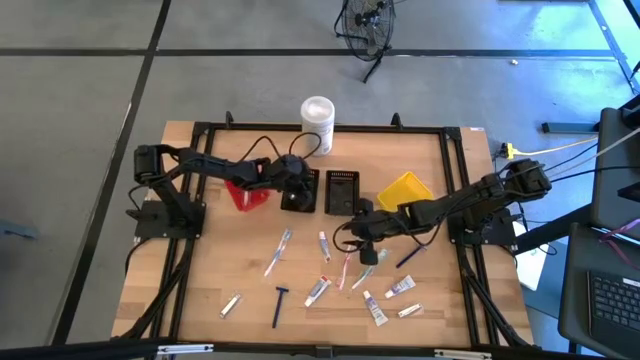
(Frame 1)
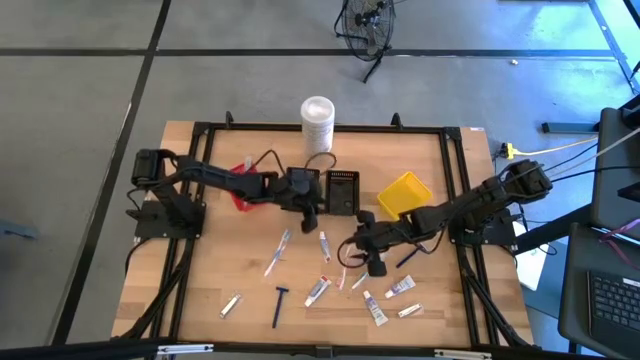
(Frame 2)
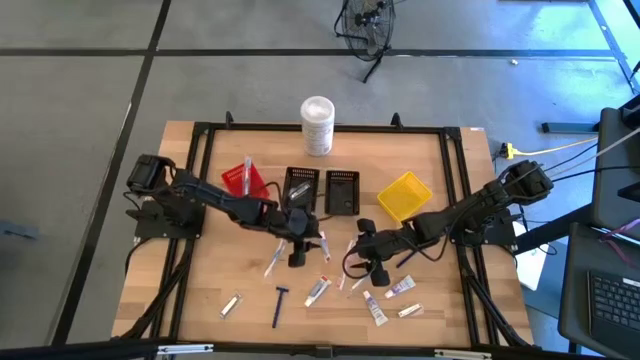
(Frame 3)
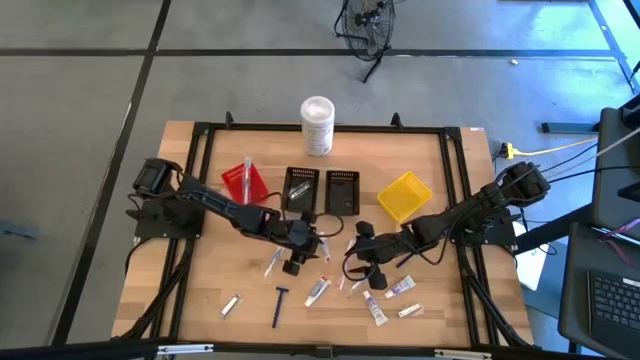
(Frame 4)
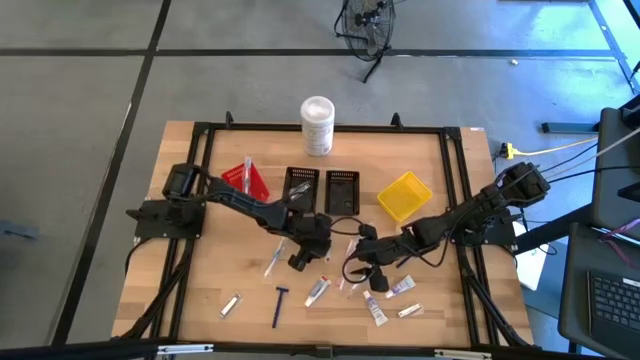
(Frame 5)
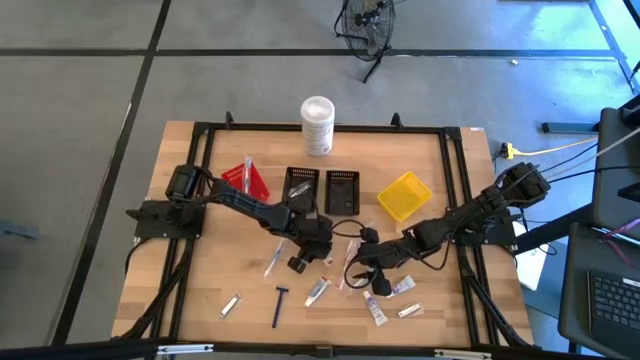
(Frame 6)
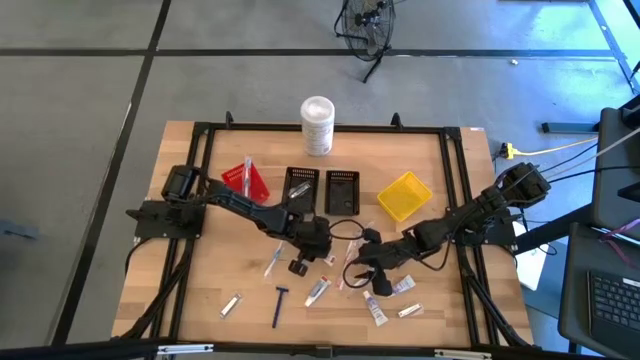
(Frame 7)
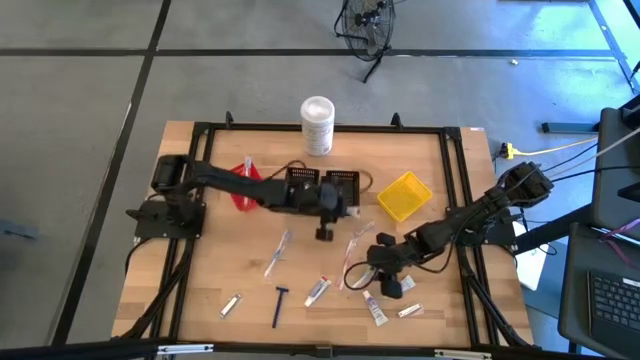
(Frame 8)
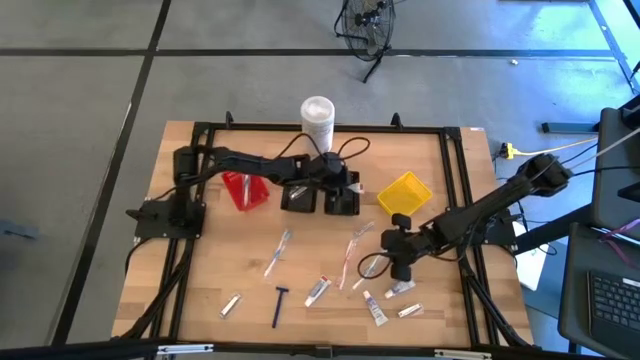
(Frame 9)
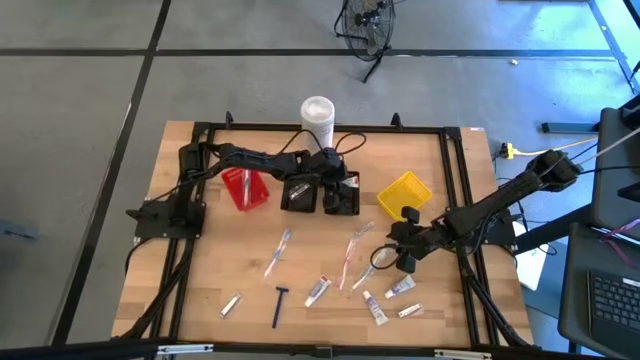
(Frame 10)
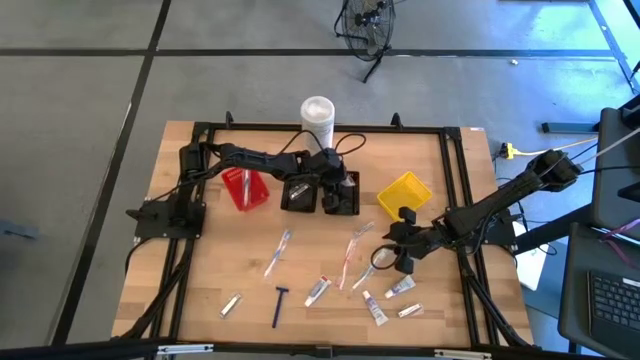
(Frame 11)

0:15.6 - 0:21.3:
Task: Pick & Place Travel size toiletries
Put the white toothpaste into the right black bin

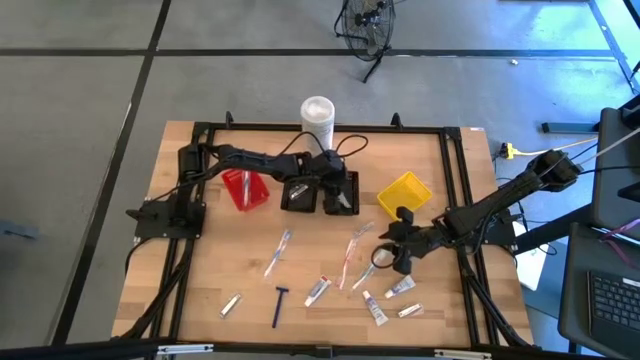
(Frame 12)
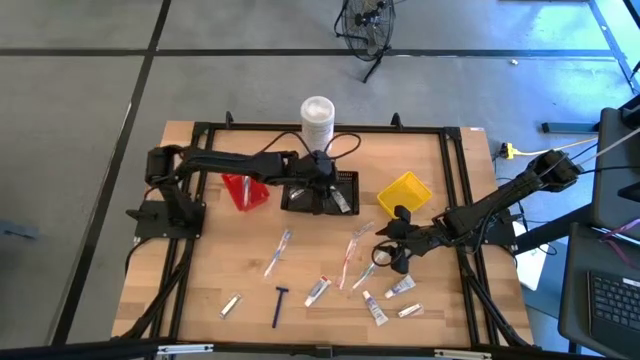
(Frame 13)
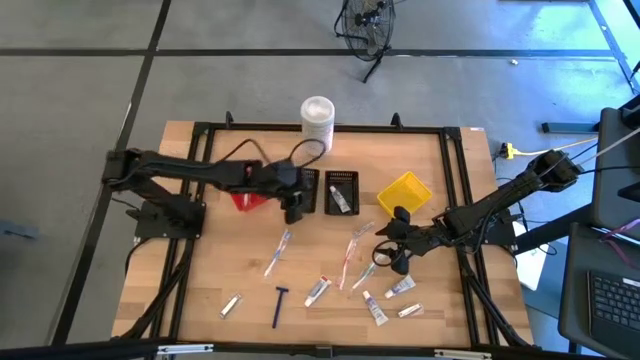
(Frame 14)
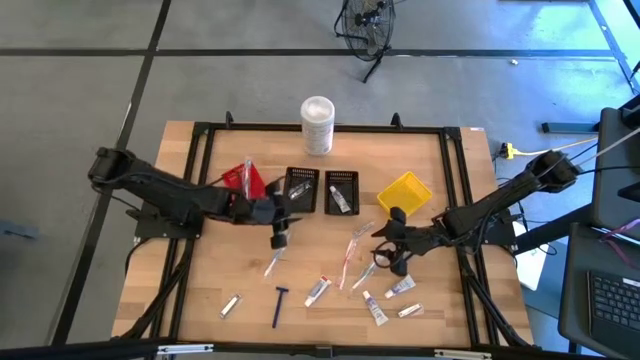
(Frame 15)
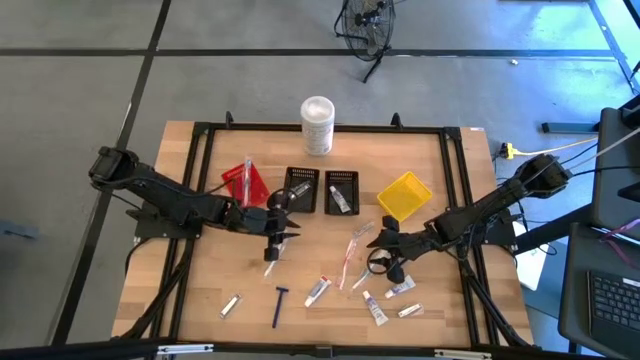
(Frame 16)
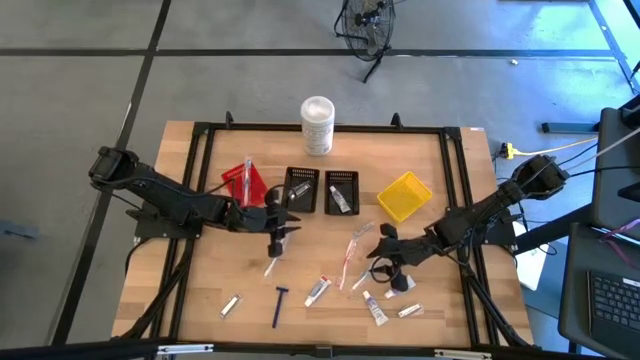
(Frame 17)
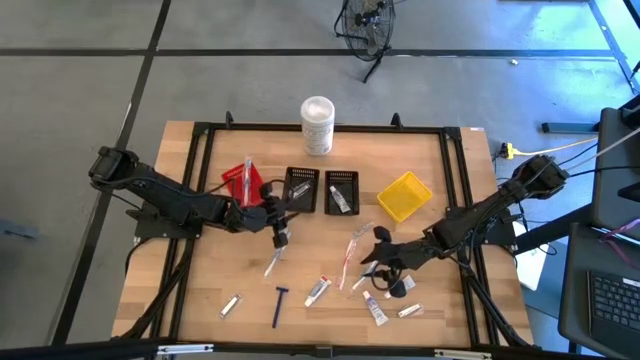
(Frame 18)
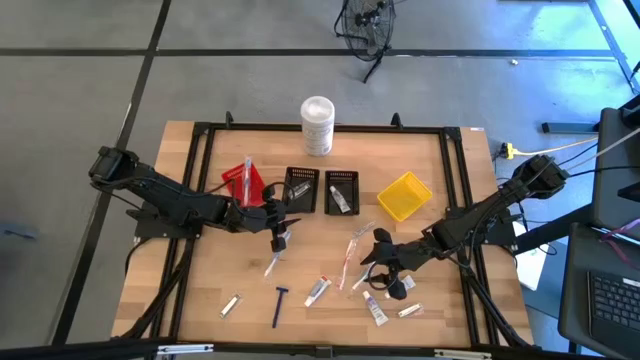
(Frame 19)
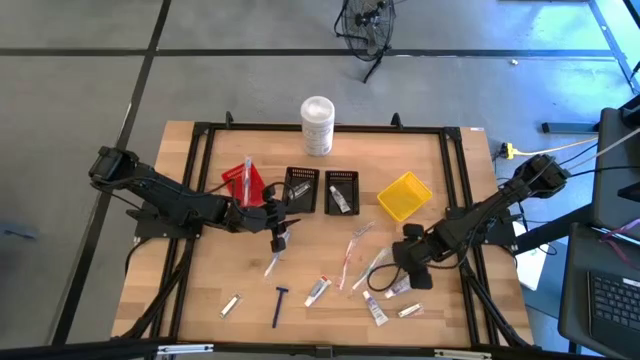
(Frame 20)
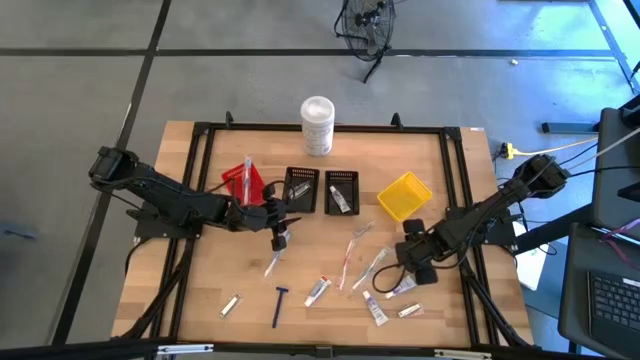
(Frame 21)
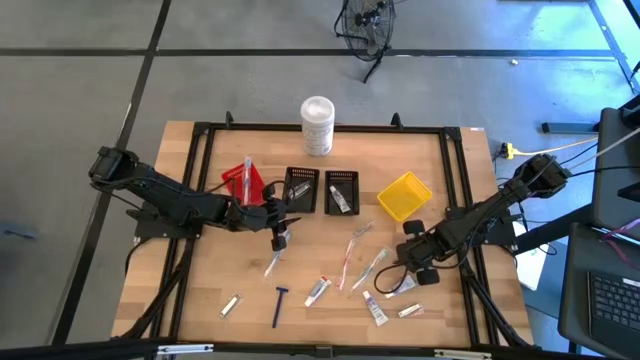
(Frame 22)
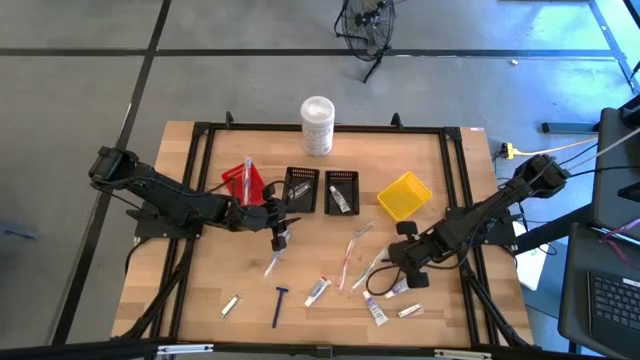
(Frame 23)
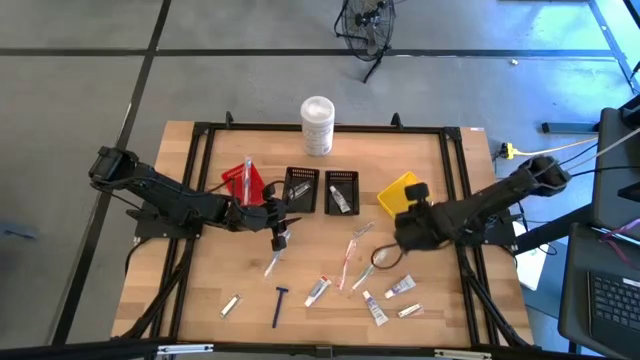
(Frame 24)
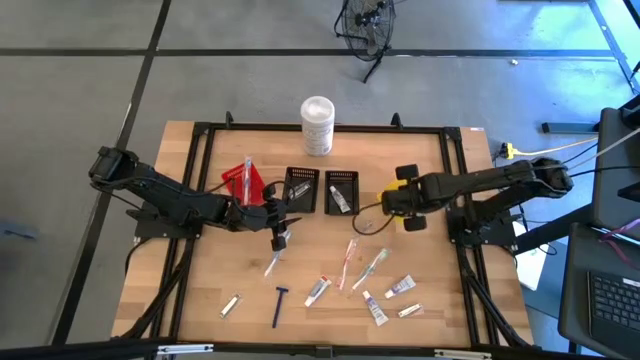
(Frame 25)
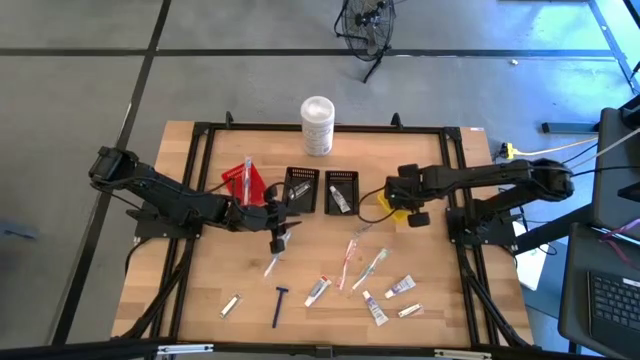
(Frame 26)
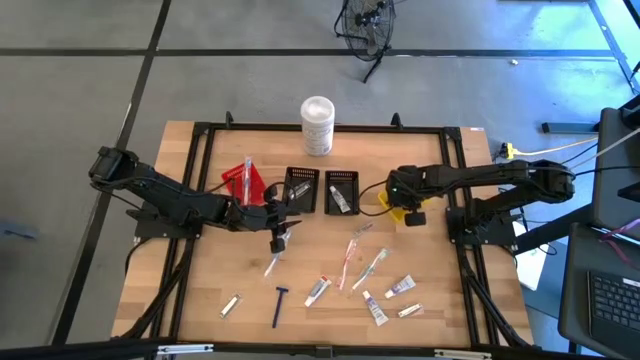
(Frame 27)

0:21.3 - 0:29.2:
Put the blue razor into the yellow bin

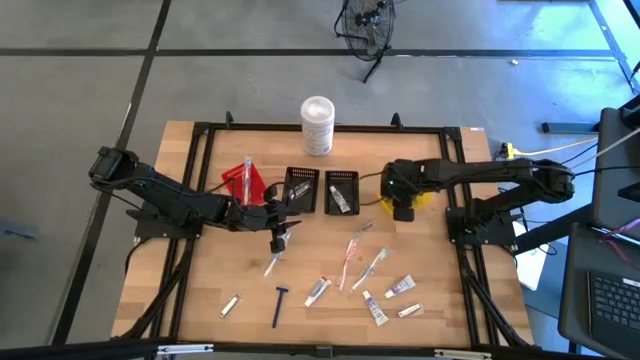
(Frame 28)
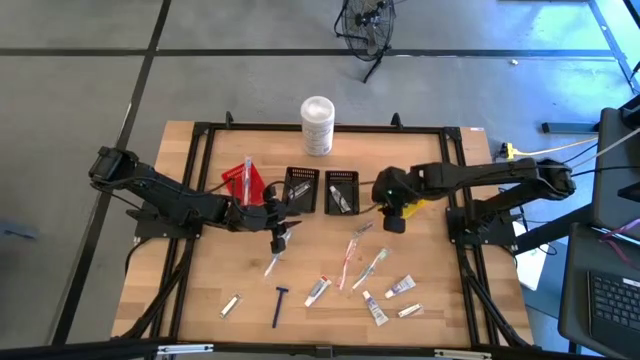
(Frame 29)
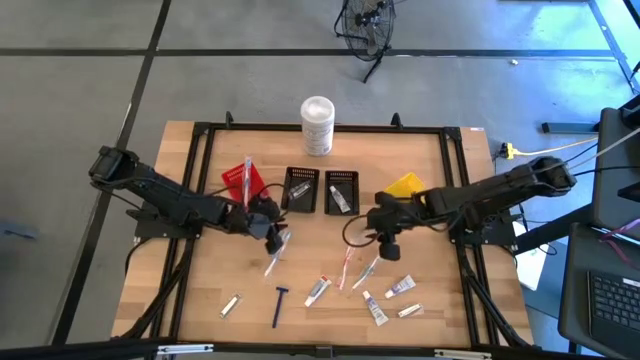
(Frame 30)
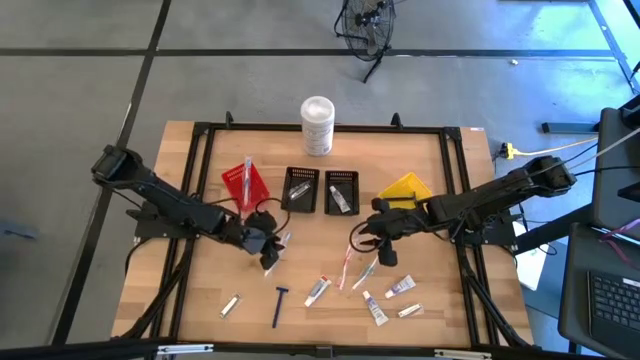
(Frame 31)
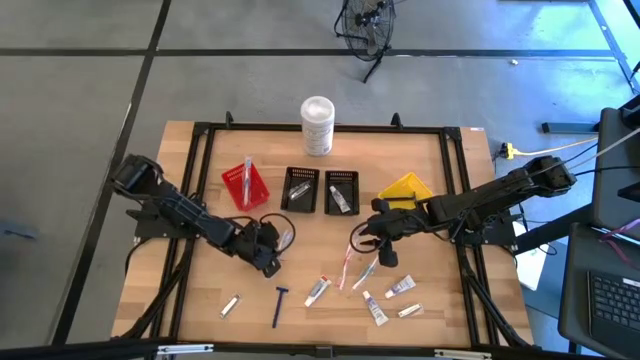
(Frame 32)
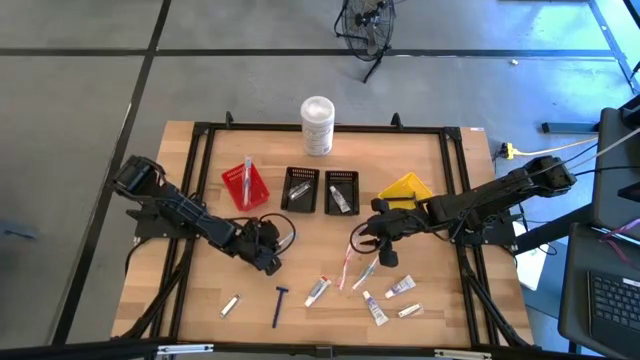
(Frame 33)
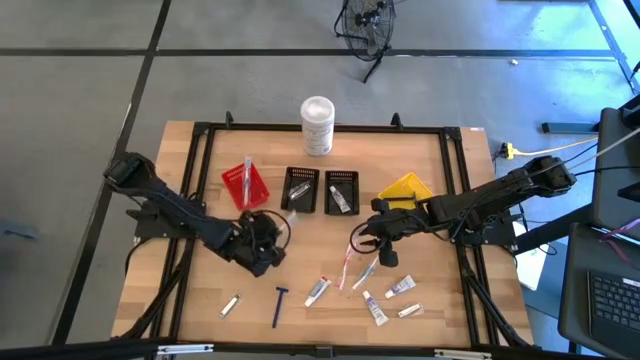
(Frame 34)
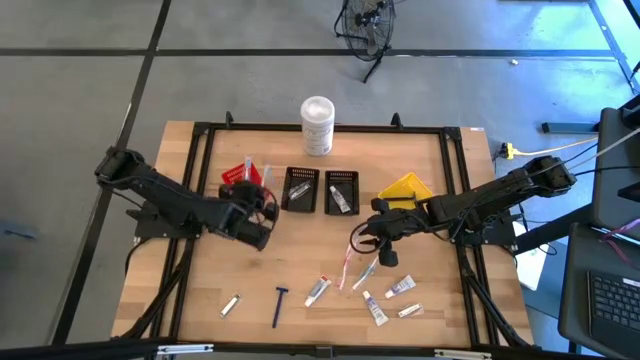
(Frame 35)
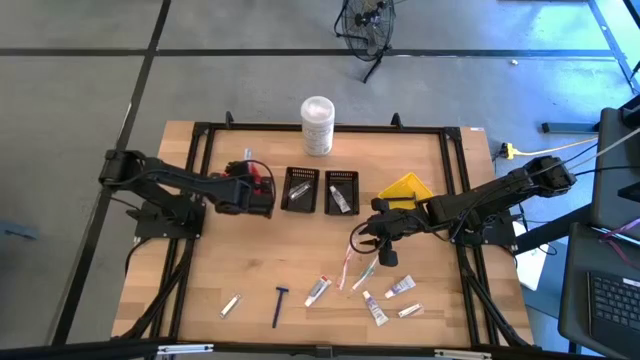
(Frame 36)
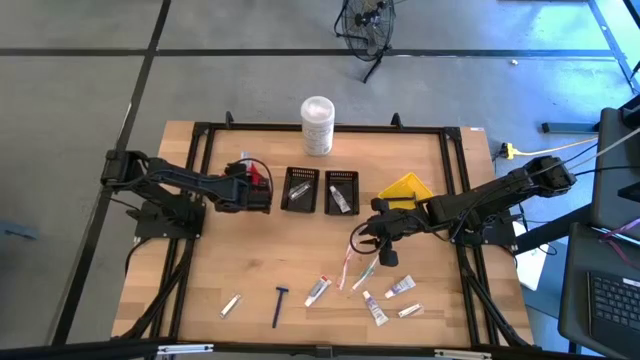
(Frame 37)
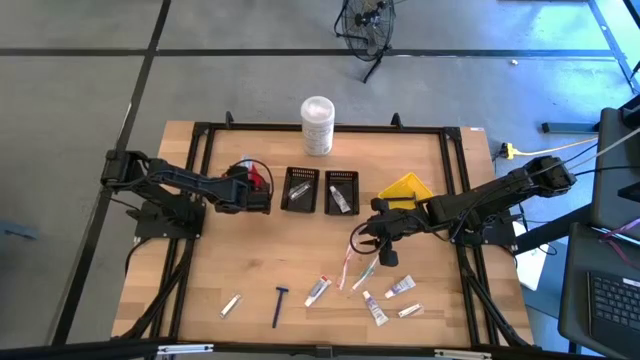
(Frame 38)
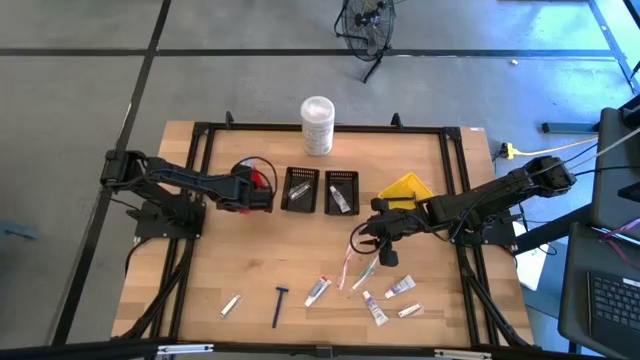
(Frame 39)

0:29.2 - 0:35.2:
Put the blue toothbrush into the red bin

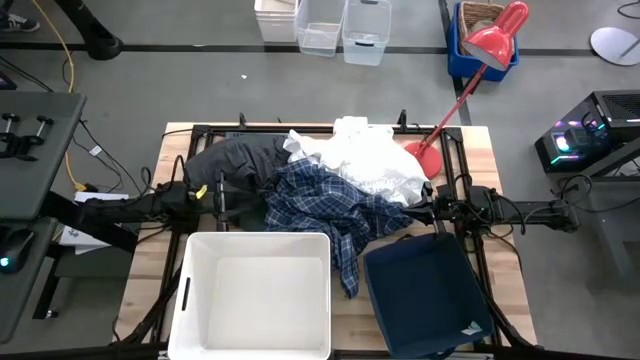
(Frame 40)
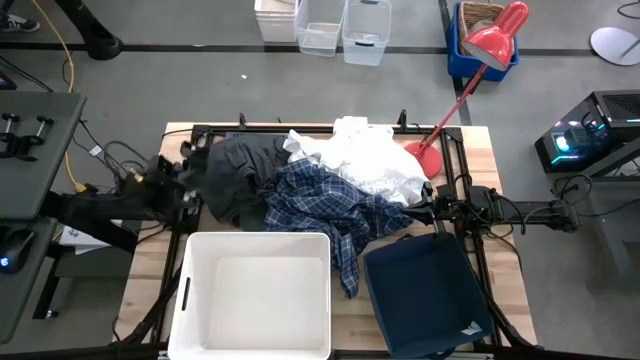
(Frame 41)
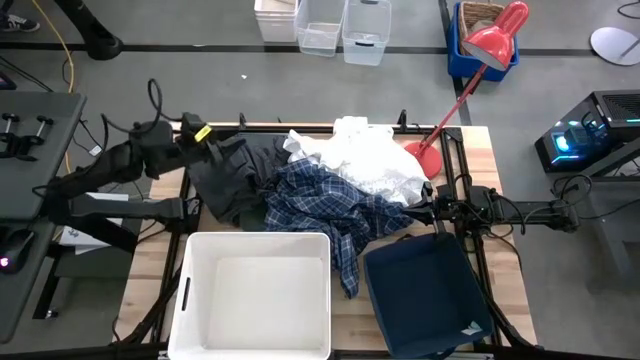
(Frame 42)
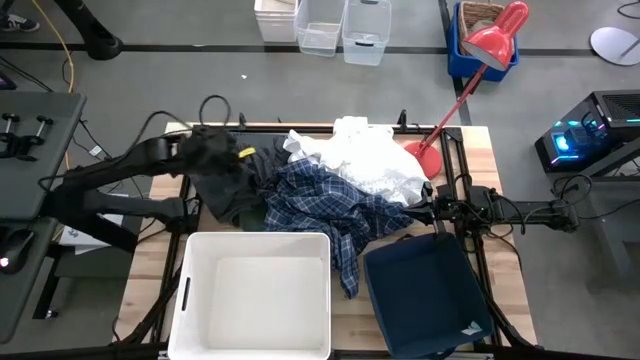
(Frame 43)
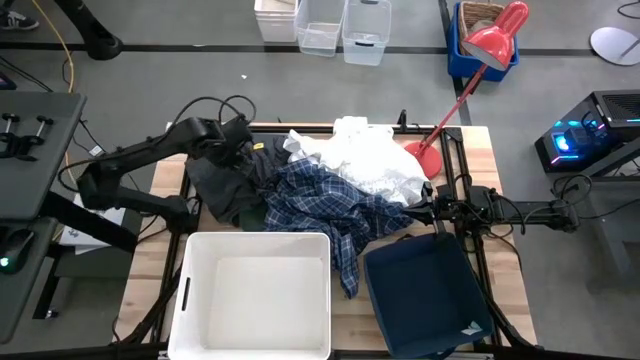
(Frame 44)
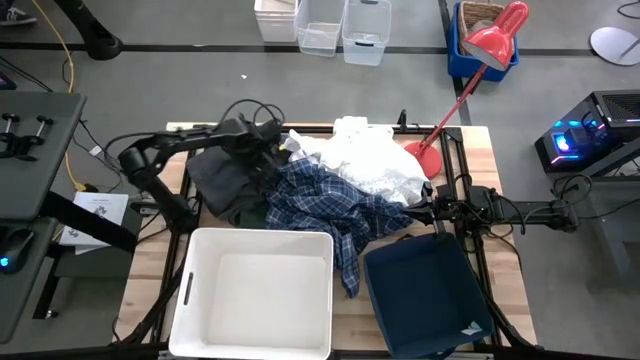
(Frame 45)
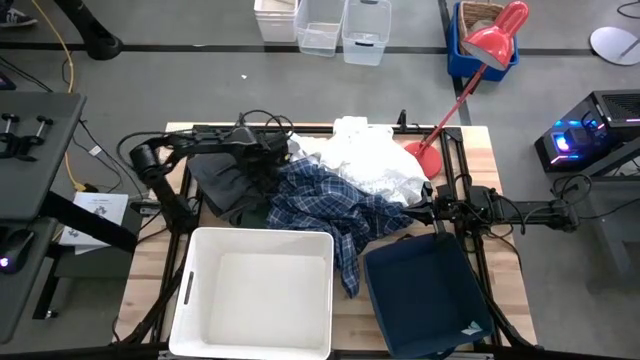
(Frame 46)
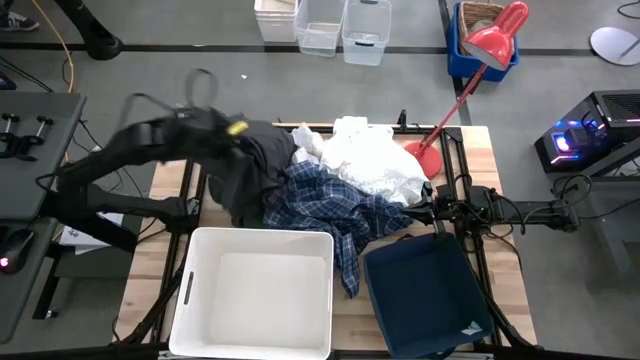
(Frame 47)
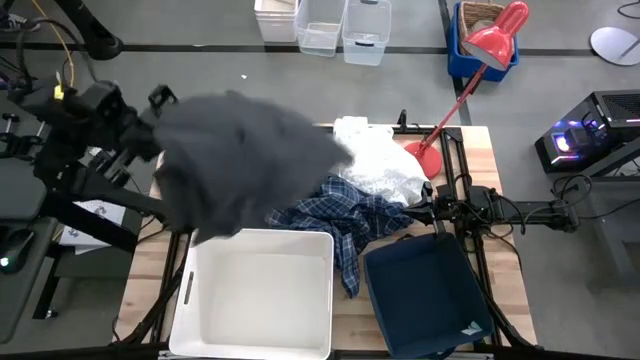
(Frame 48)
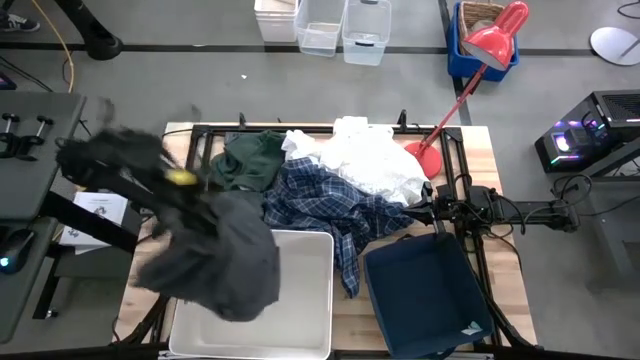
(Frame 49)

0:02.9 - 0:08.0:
Task: Sort clothes
Put the grey shorts into the white bin
